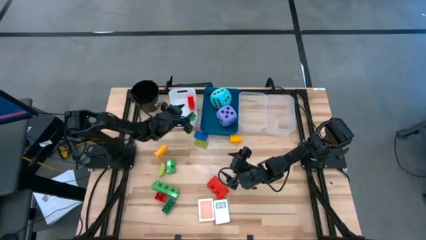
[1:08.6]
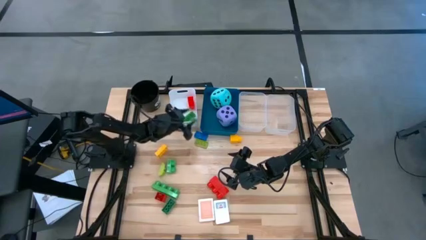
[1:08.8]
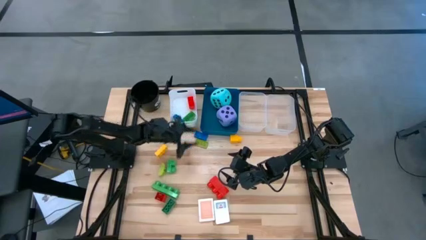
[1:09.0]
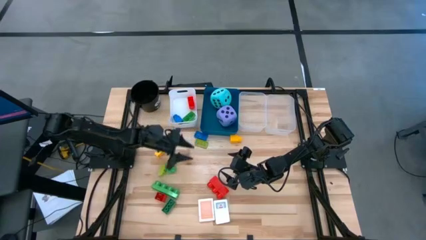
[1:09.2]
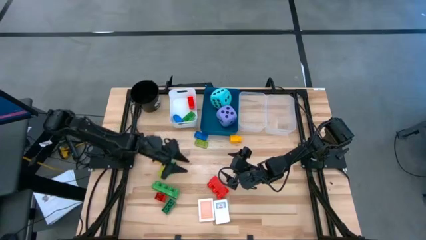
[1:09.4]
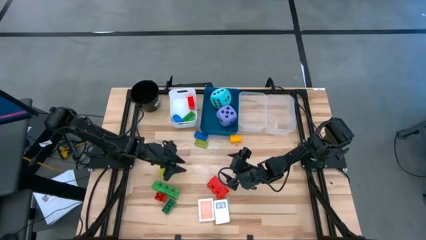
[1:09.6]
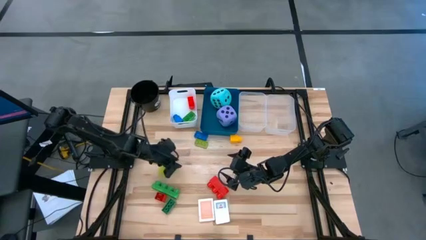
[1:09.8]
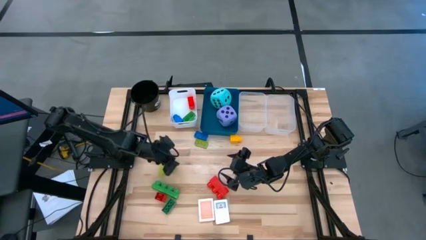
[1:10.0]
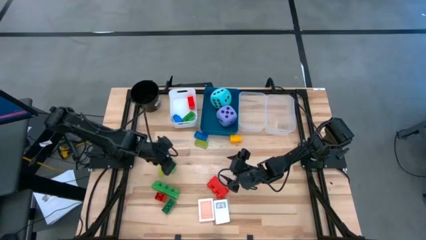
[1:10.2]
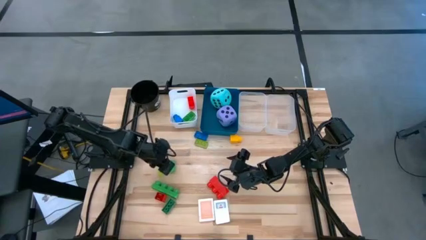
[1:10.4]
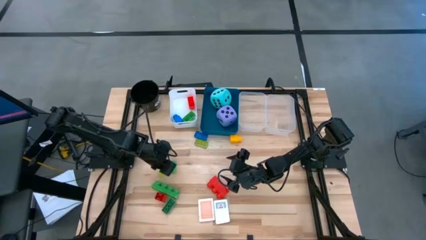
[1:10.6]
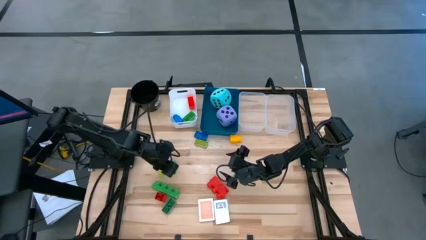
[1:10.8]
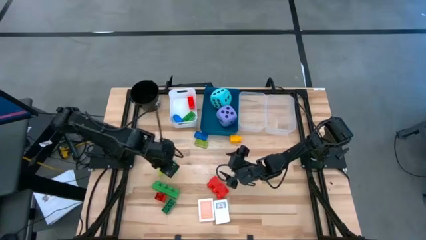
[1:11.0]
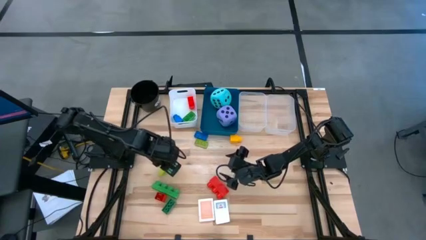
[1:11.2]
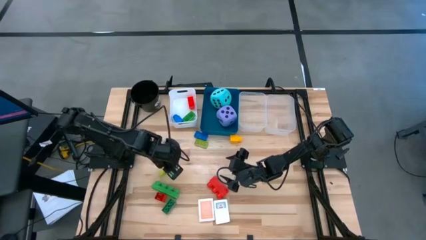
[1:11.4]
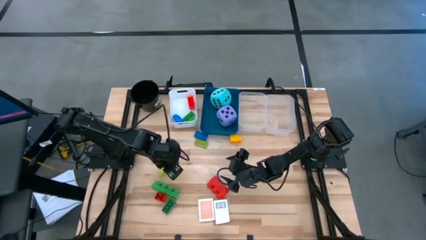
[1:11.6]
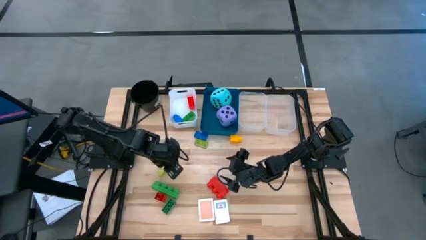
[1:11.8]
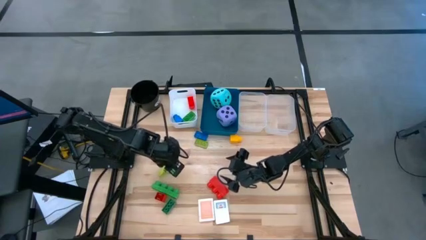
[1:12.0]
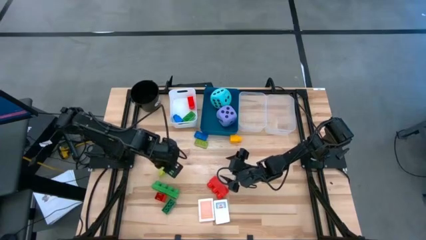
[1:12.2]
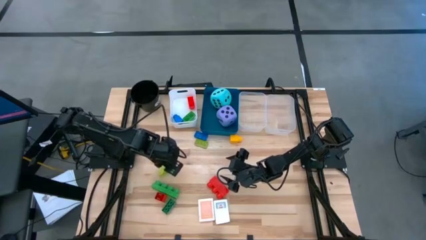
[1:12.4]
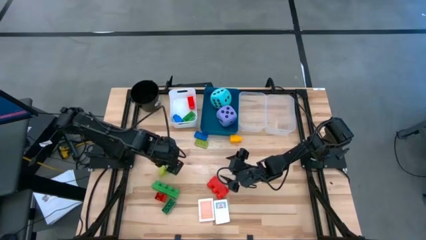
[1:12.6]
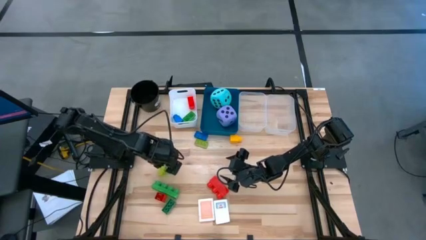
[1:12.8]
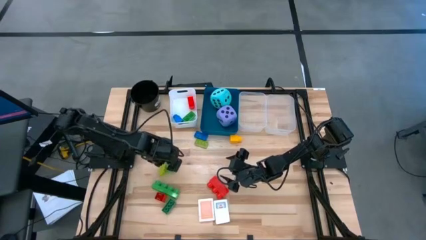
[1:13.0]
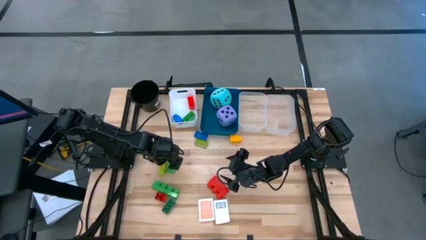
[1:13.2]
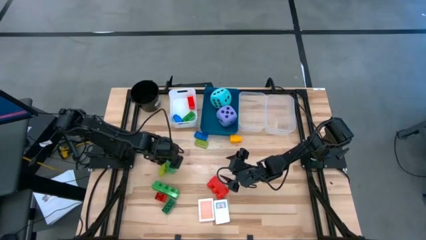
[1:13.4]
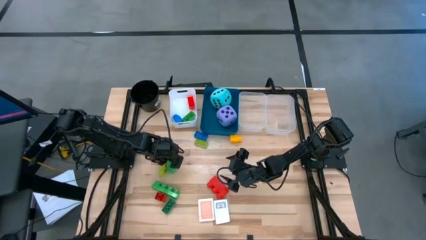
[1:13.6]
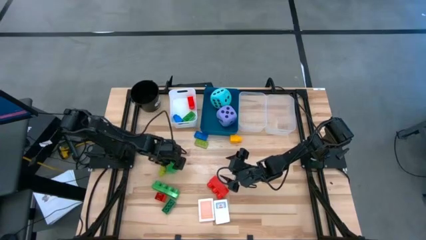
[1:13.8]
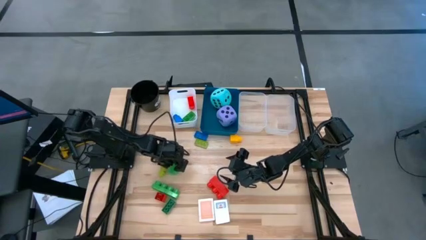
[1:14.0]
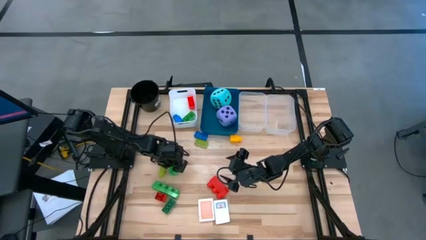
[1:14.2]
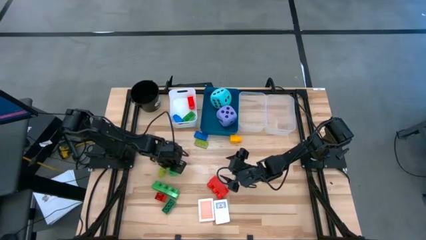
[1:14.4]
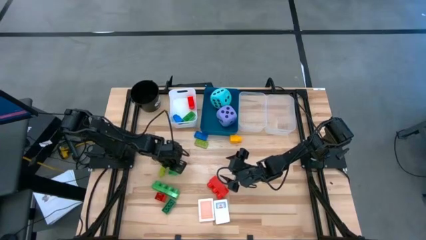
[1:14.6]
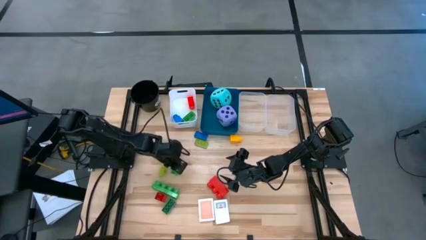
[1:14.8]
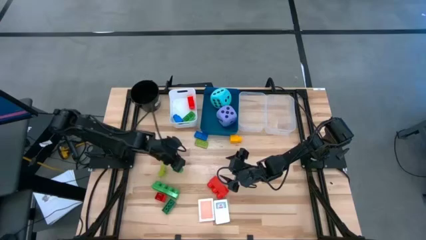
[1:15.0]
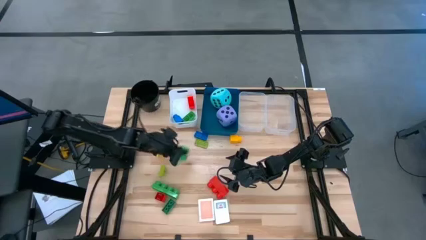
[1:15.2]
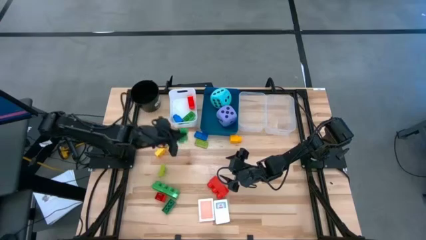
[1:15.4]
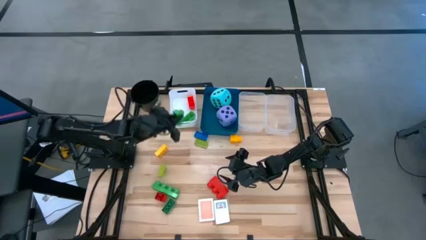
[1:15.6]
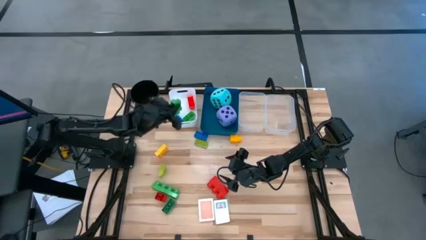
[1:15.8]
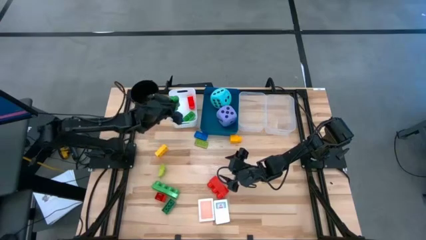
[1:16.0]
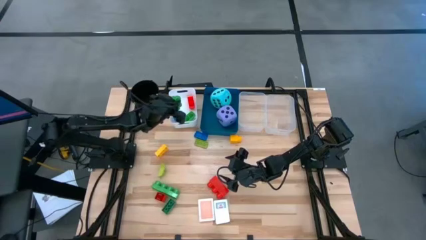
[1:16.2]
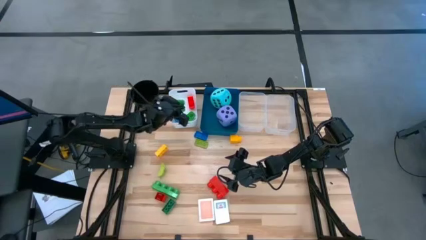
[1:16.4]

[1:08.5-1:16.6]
Task: Pick & Place Toys
Put the top large green game piece into the white bin

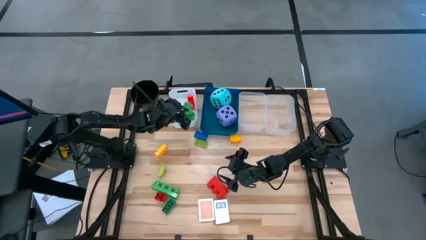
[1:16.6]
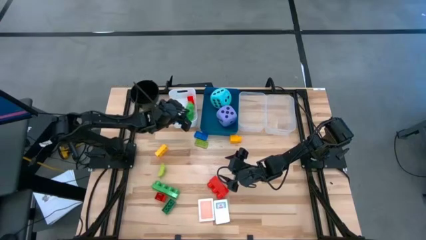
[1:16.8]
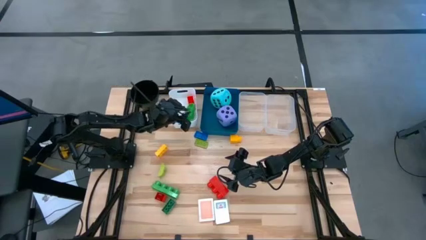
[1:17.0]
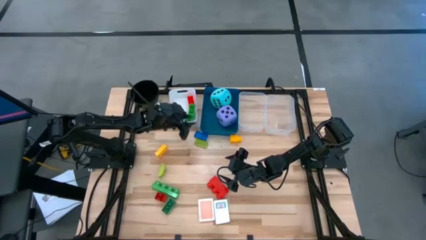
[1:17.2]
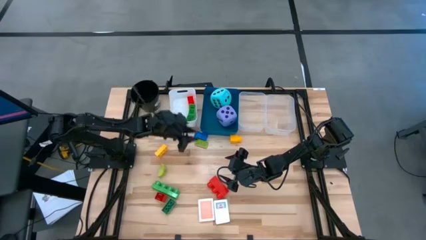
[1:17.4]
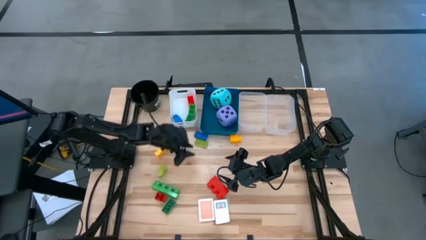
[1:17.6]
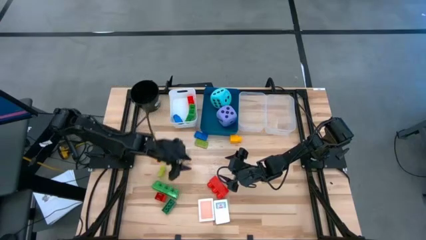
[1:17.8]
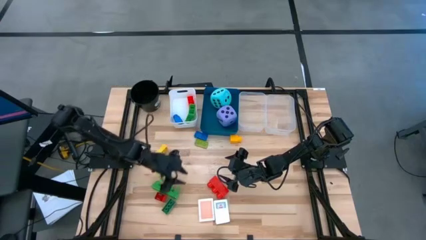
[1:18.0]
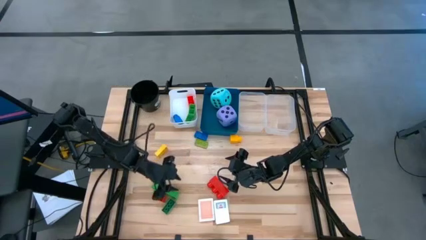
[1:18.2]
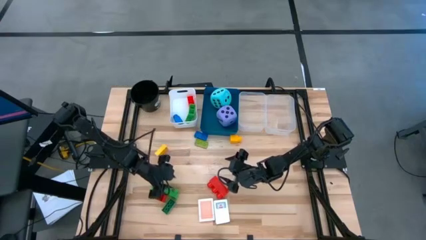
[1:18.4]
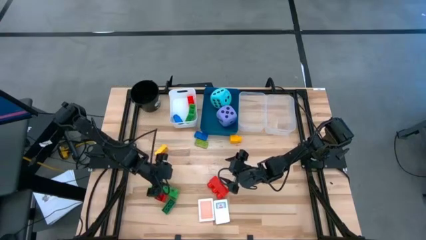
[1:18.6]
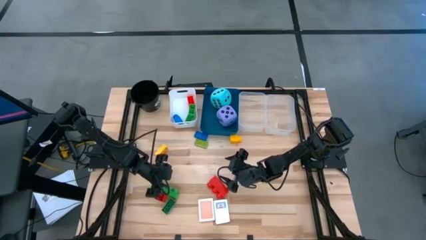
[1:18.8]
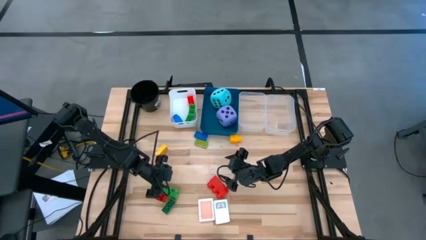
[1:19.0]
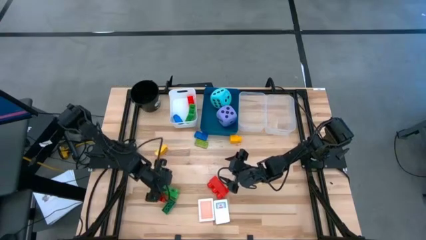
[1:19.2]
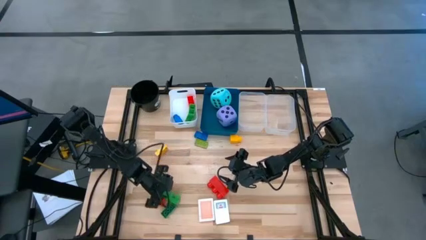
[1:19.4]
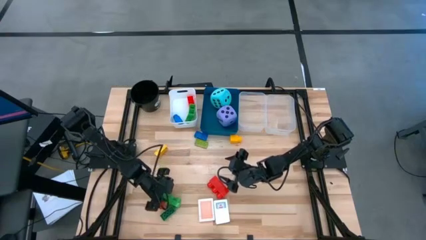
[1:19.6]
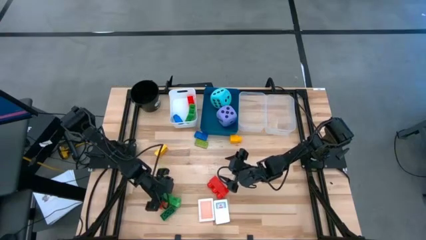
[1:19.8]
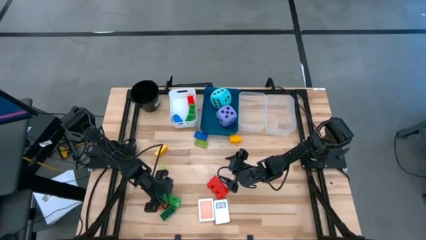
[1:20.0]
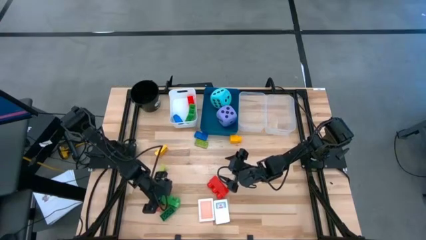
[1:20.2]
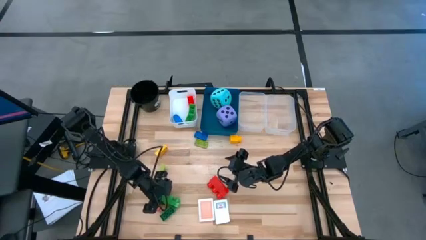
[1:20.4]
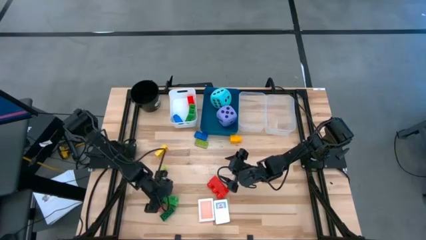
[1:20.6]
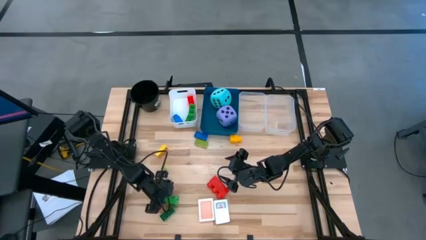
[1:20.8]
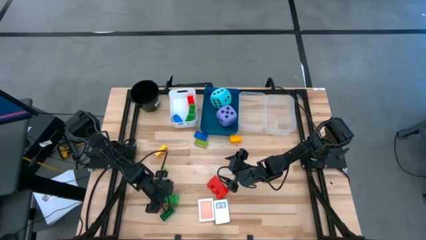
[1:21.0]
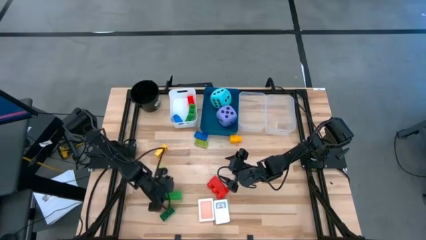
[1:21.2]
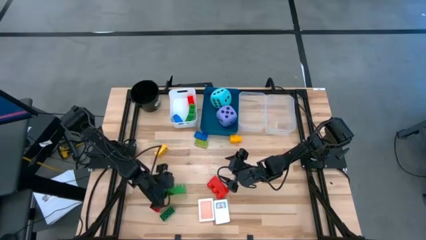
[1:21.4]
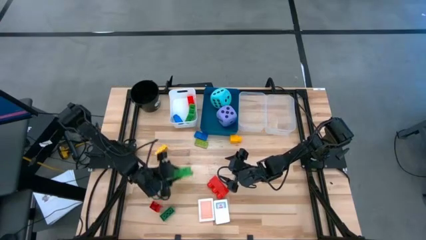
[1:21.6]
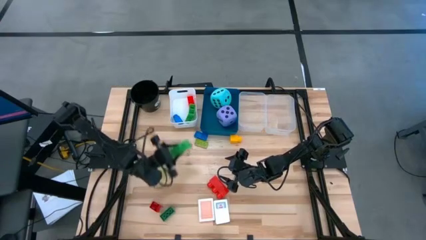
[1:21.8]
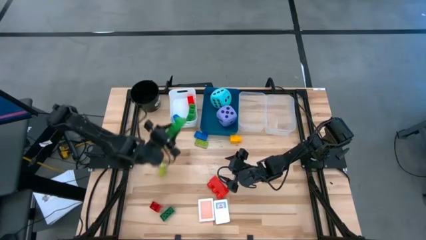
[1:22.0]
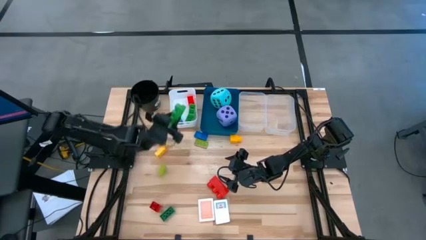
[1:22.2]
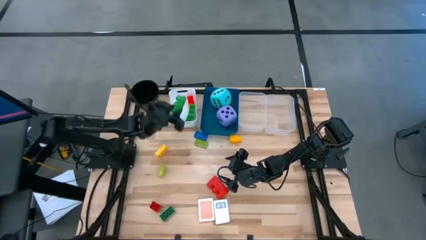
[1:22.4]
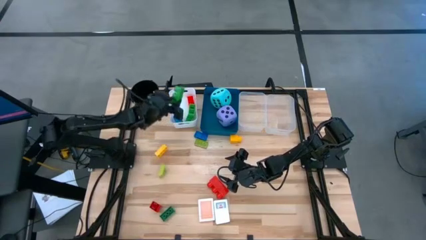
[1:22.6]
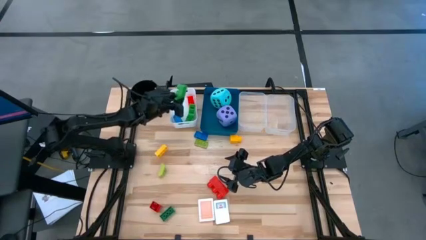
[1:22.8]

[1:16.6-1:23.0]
Put the large green game piece into the white bin

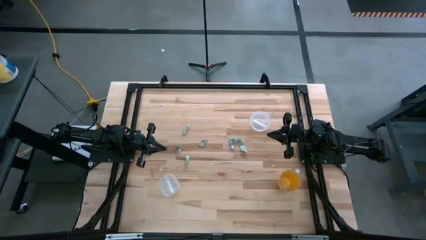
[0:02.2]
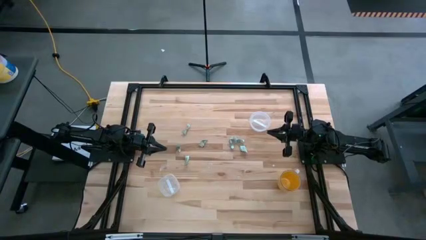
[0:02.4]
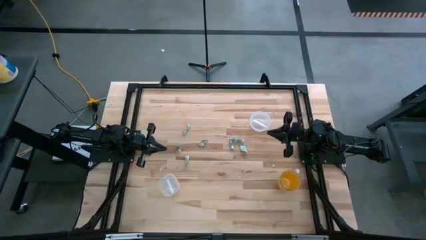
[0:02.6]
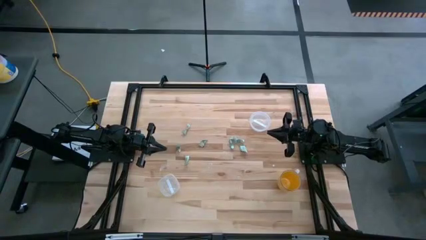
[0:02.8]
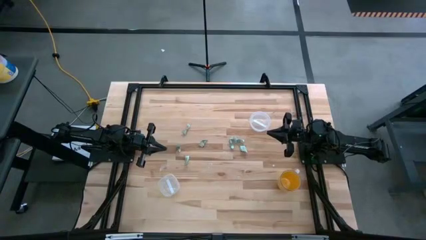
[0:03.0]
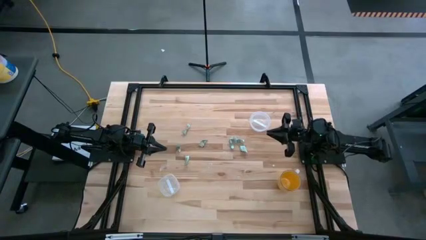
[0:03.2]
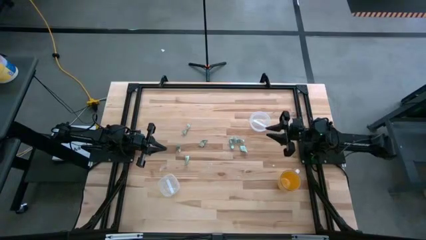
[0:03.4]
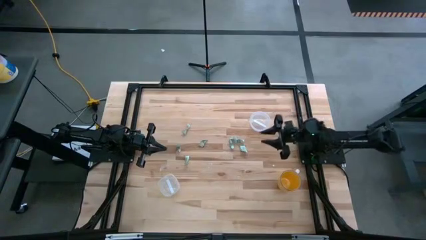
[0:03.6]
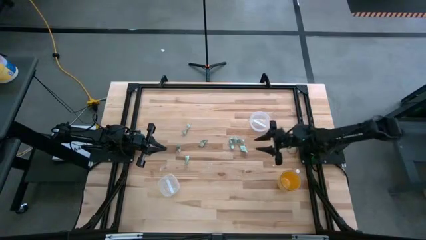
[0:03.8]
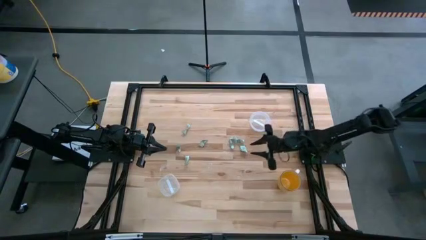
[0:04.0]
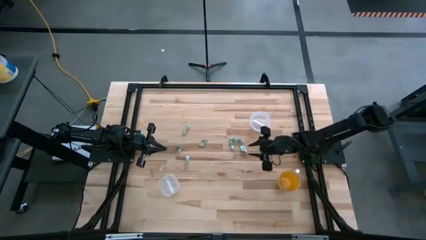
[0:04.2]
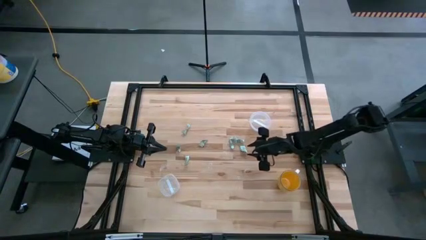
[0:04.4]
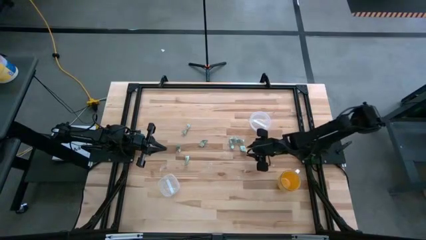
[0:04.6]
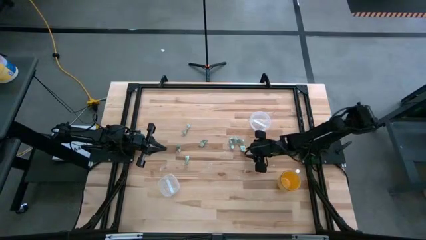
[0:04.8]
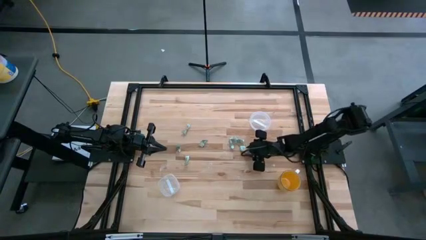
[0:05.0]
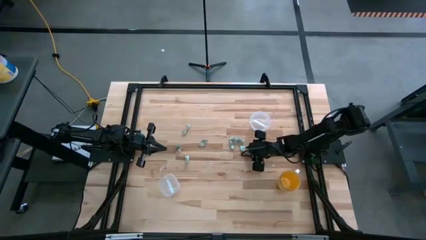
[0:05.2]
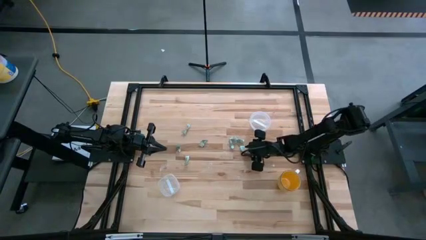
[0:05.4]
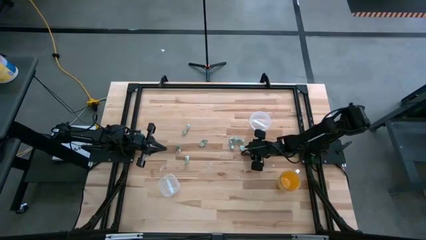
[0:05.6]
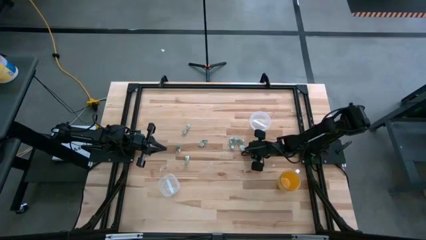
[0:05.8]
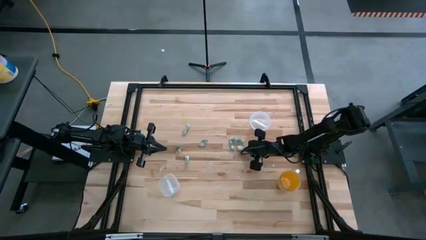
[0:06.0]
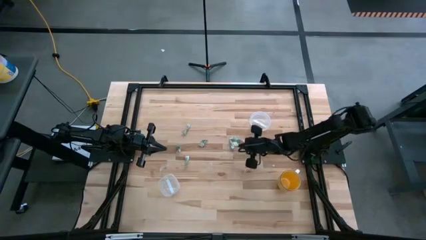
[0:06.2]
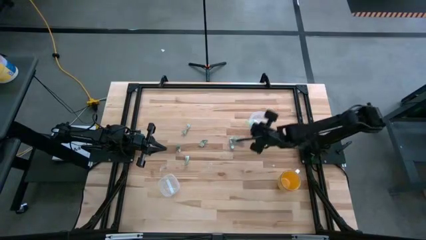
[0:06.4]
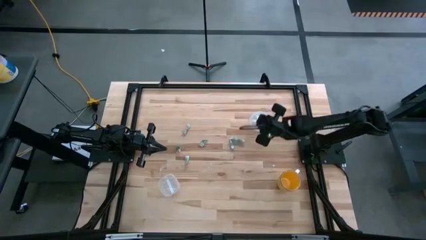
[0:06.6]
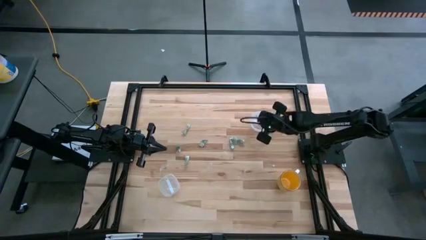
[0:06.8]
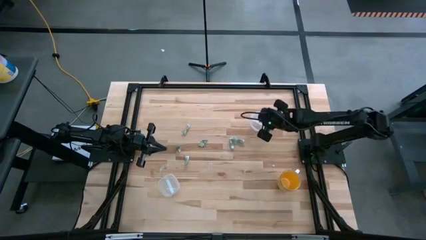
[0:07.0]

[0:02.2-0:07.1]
Task: Pick and place Stevia / Truvia into bins
Put the stevia packet into the round transparent container
